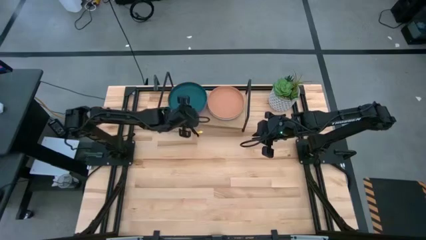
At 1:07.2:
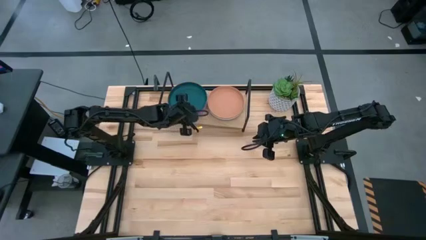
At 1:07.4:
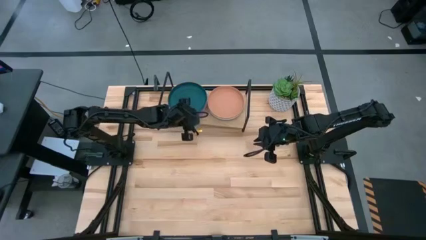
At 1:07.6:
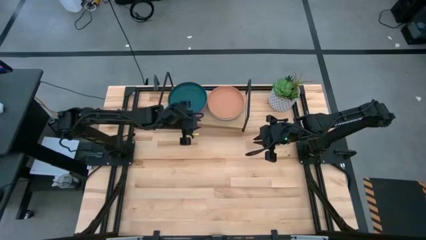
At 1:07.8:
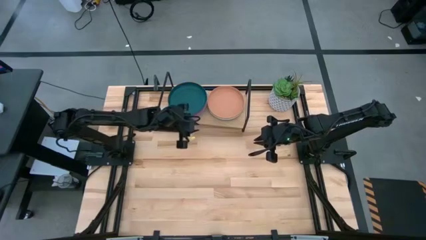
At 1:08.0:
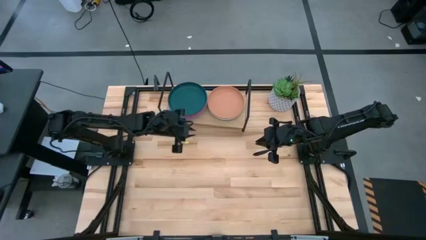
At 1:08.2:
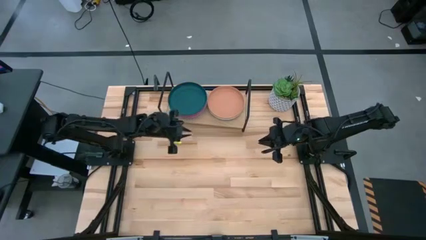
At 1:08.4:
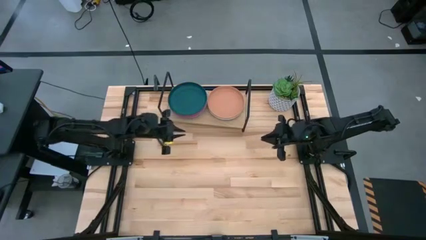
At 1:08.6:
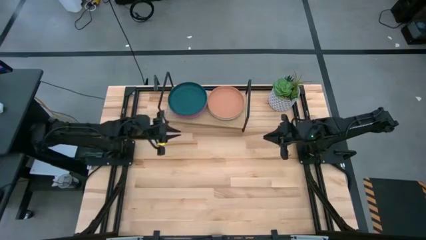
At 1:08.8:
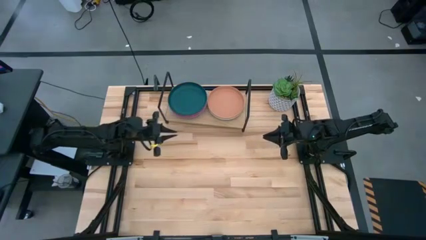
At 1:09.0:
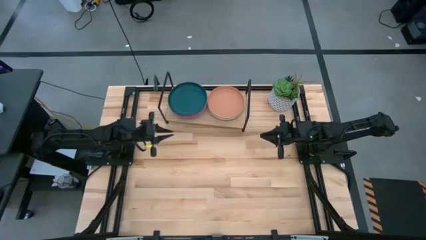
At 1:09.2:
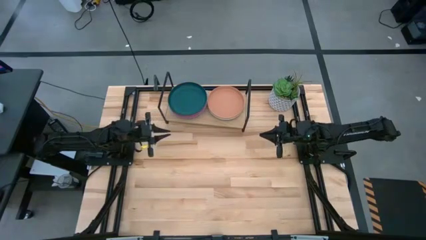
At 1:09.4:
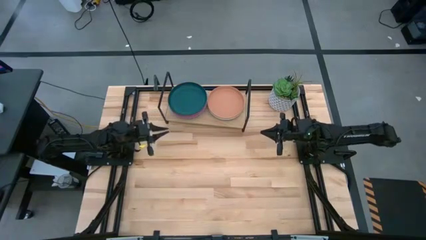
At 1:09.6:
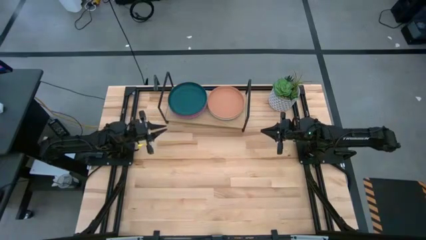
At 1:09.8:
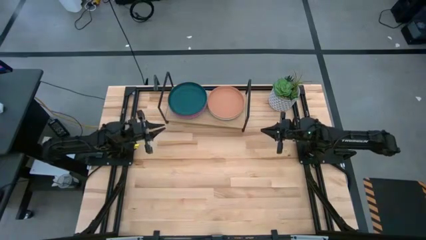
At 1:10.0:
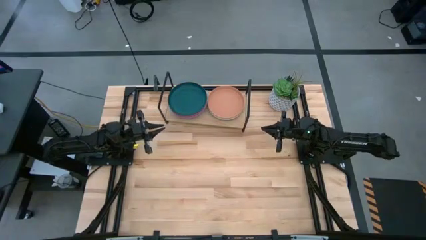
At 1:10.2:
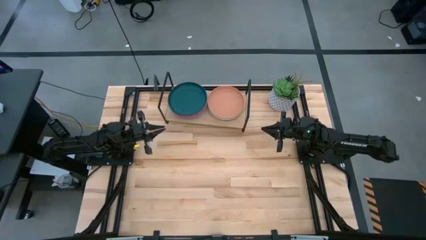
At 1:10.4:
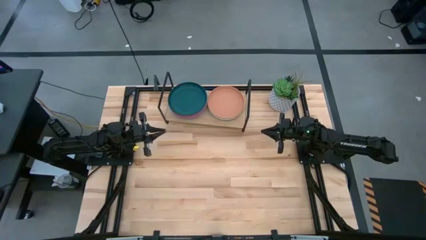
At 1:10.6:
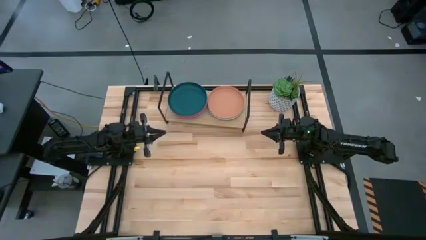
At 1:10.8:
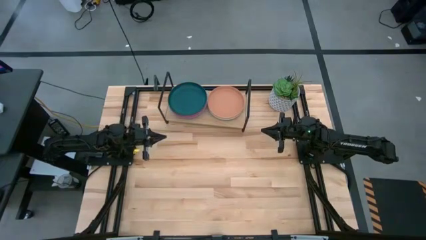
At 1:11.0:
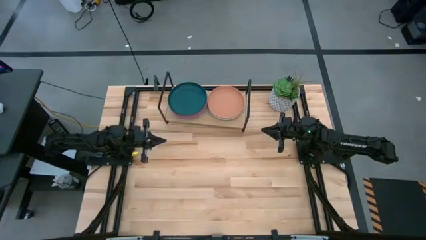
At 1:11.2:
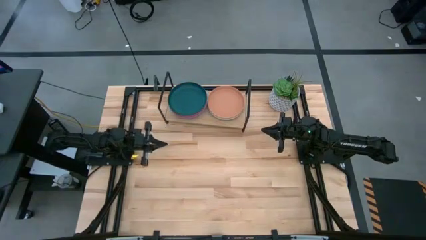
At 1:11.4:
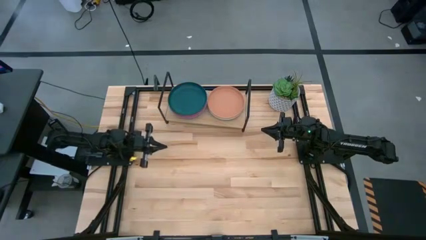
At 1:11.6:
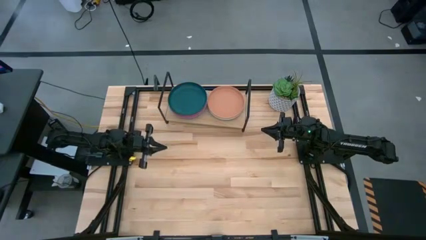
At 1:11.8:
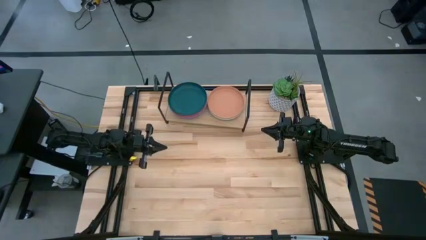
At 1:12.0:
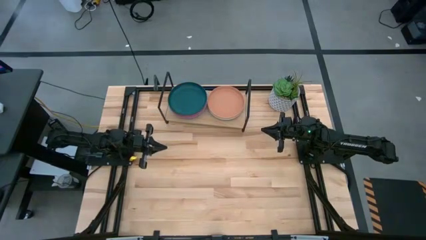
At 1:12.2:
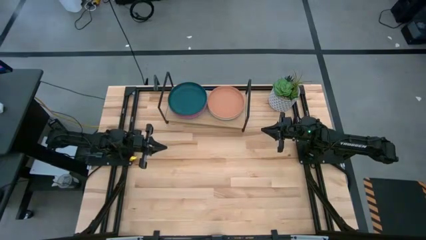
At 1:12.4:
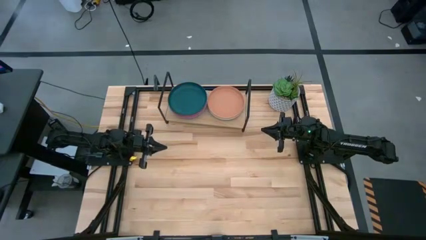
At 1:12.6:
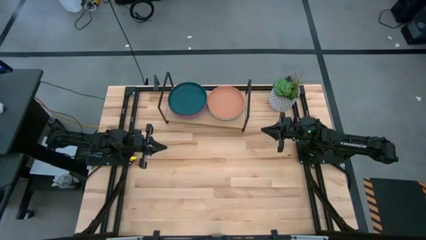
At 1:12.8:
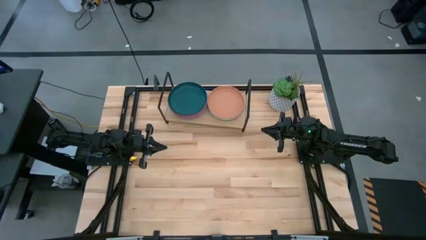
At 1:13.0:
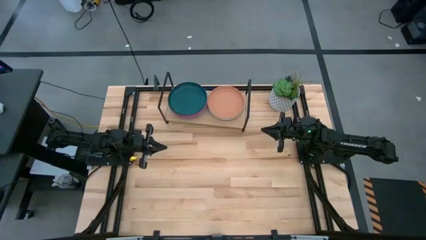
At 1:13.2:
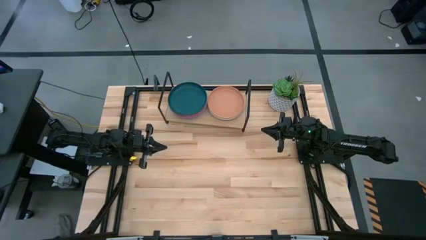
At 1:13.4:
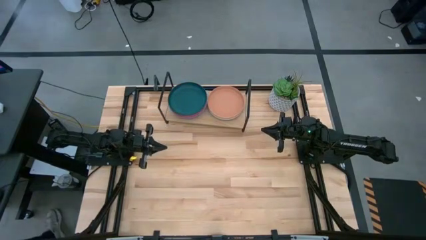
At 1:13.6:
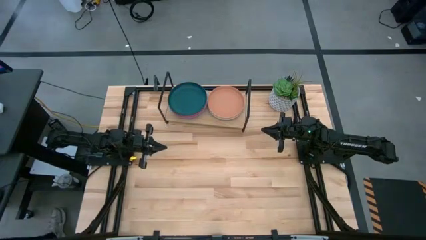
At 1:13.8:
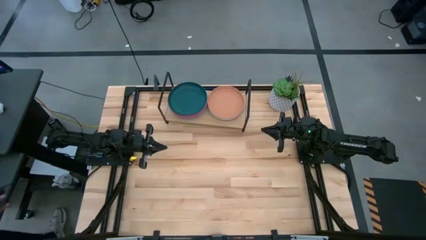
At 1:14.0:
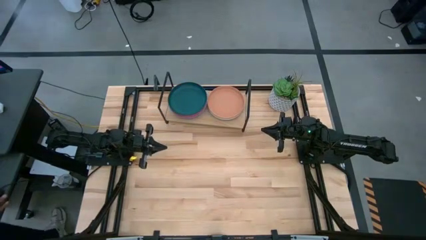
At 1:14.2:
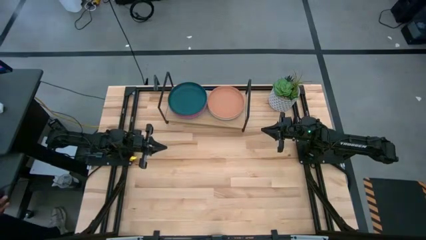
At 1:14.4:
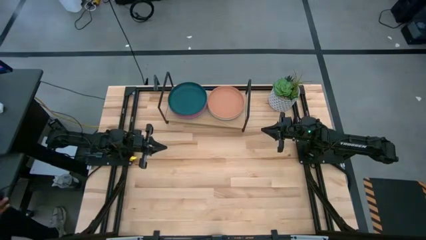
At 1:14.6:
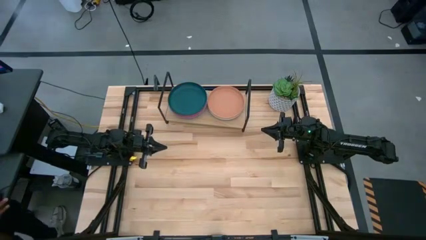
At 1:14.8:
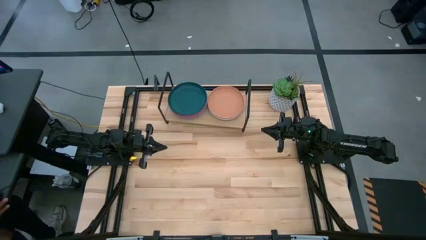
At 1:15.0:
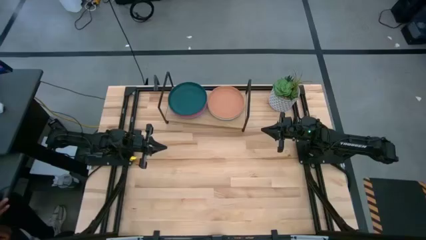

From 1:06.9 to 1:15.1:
Task: Place and stack plates onto a shelf
Return to Home Position

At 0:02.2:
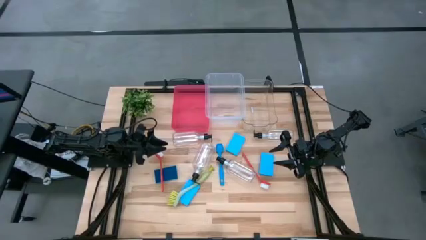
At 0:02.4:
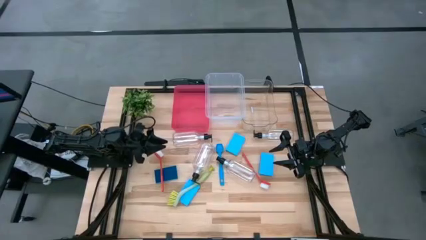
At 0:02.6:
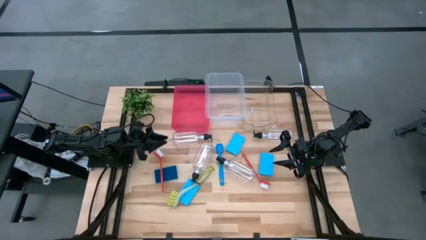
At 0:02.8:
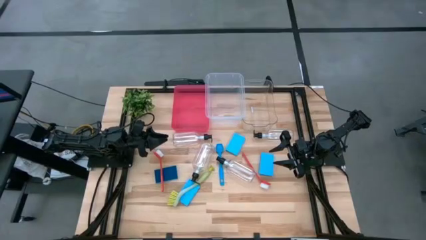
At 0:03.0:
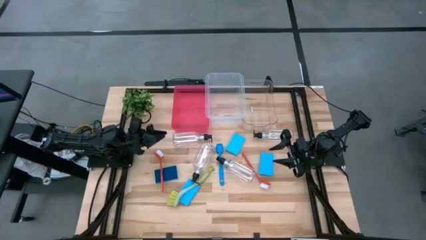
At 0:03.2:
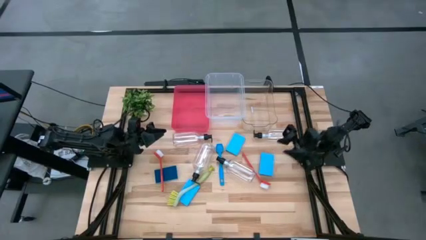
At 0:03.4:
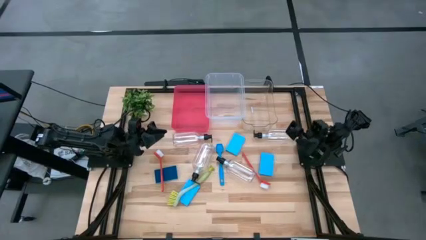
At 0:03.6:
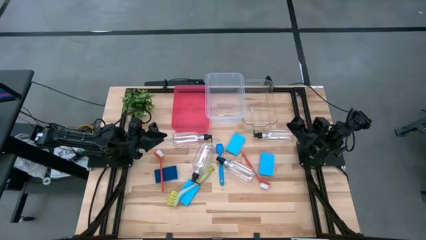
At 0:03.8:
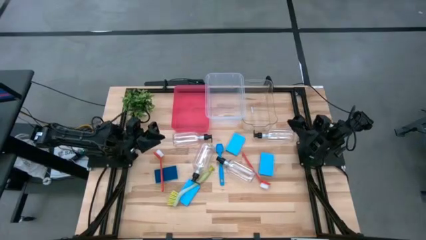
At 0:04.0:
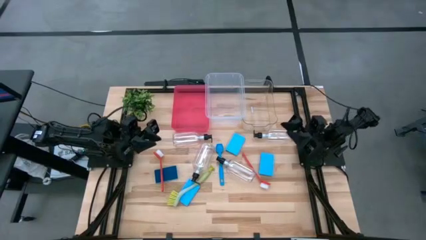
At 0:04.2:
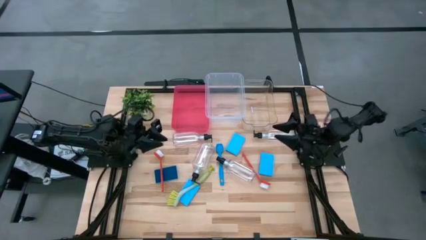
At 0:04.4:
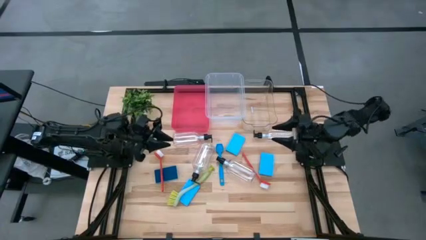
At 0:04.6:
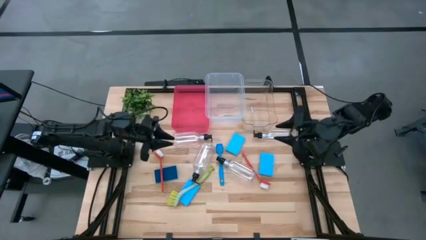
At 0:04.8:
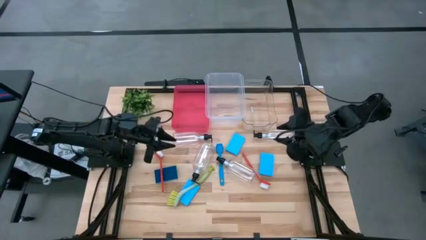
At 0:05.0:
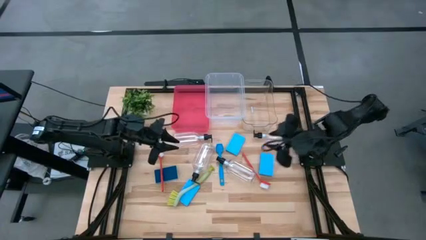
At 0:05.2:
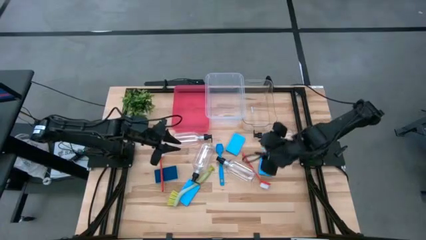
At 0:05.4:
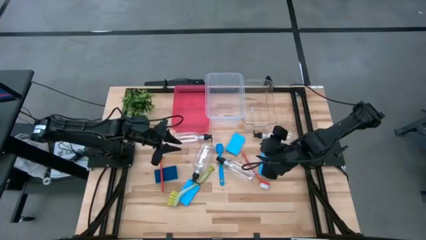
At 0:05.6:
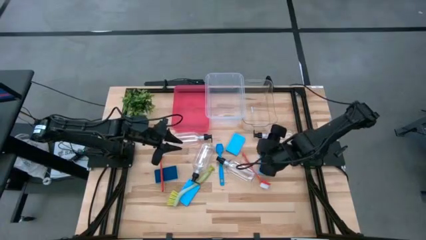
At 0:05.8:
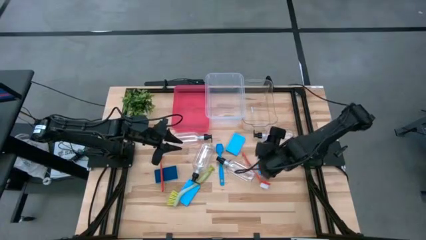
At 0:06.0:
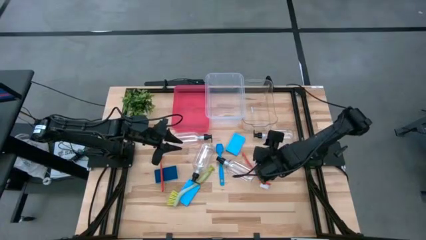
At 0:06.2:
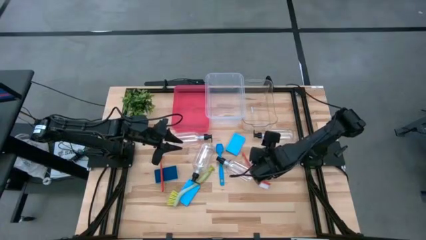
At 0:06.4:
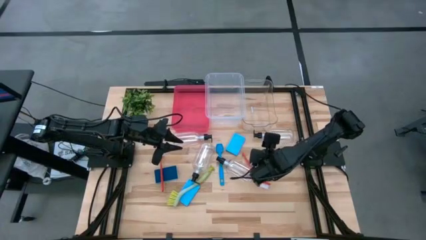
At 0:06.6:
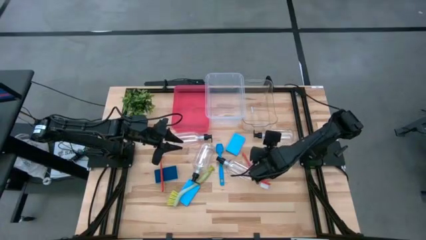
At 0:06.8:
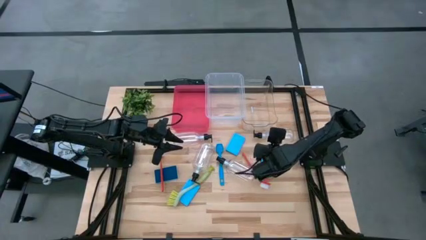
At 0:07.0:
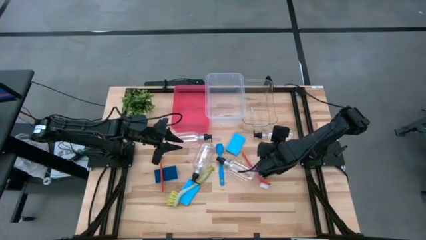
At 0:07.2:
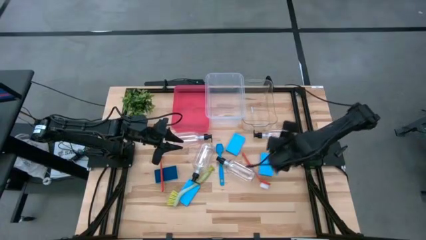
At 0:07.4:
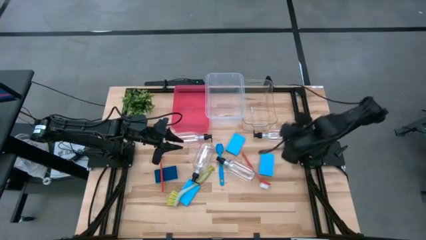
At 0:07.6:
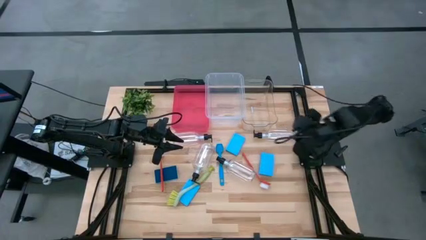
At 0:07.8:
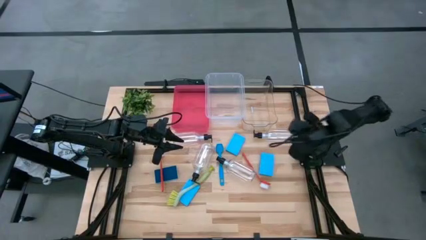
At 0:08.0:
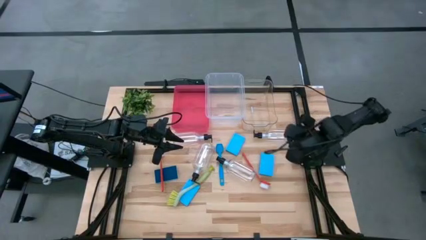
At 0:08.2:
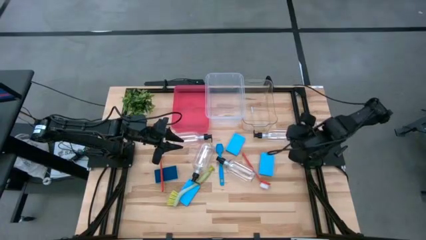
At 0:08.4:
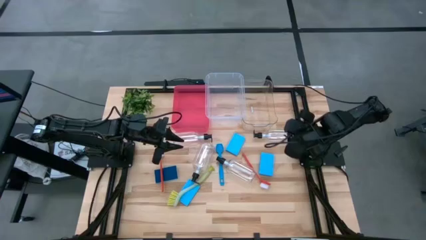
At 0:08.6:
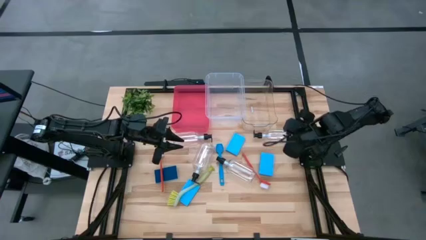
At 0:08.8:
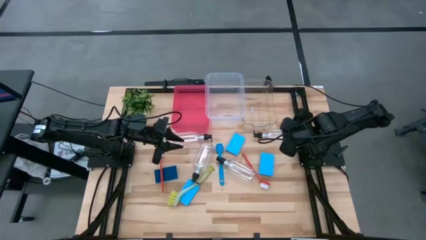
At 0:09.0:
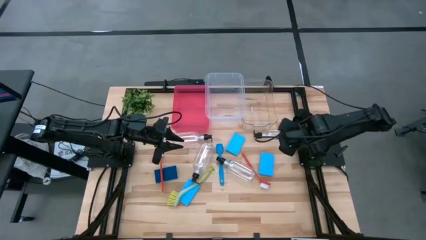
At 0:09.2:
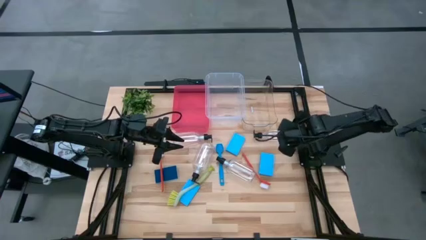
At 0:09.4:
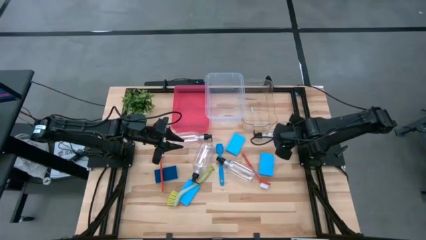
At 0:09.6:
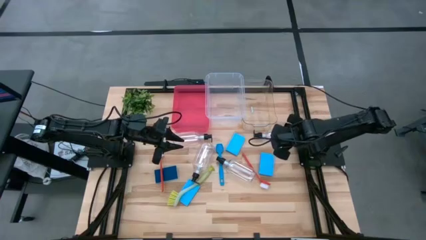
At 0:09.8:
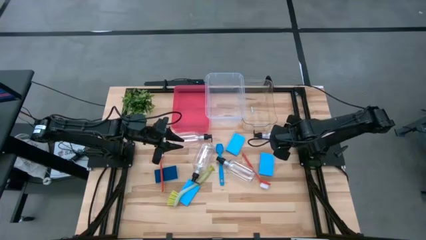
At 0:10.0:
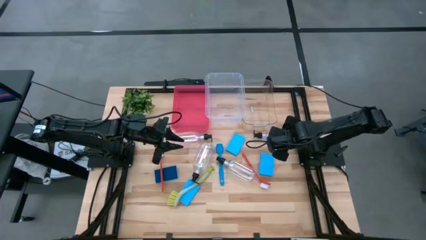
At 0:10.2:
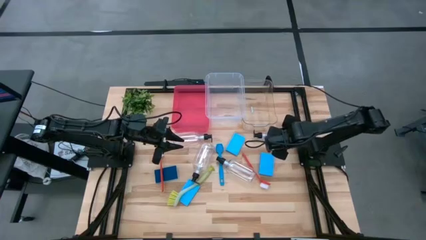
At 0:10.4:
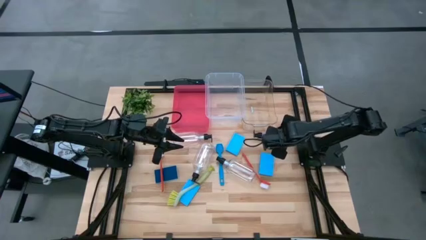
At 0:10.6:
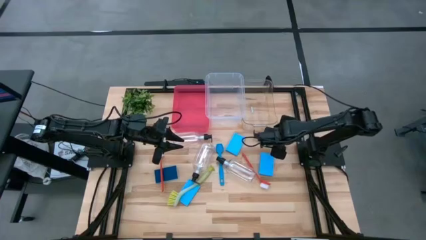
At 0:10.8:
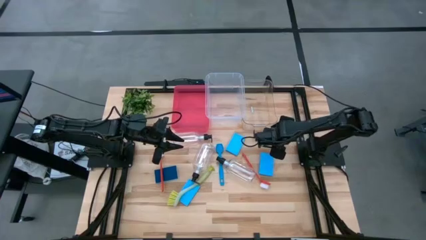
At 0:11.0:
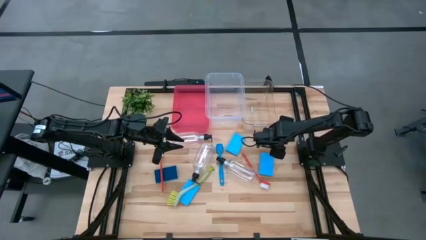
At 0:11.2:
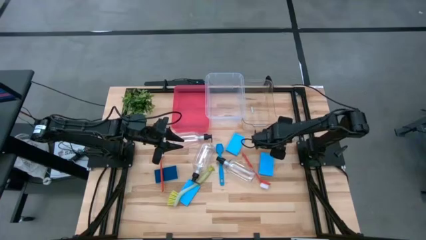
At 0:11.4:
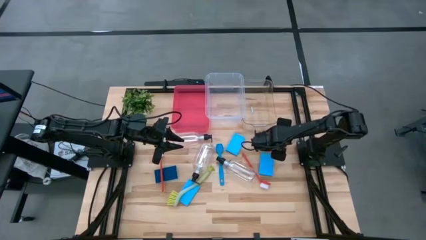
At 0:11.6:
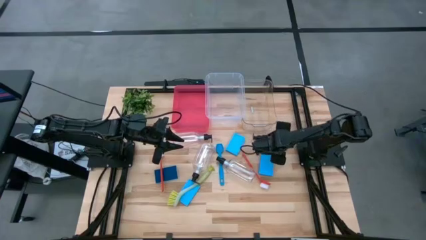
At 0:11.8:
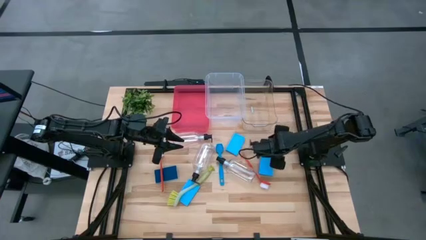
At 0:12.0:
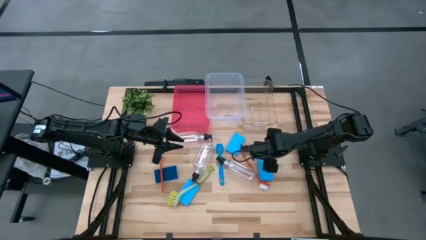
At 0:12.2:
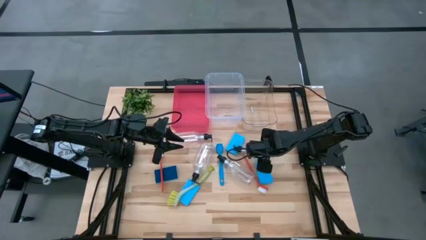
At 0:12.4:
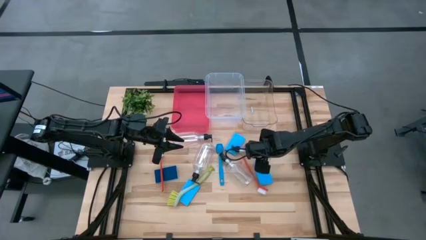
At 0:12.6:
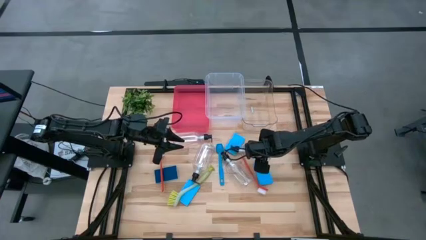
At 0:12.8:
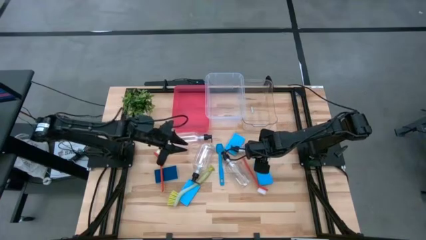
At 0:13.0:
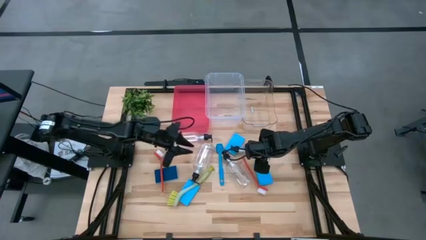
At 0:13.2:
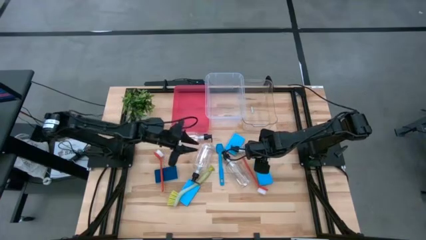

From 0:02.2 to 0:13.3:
Task: Pick & Place Kitchen Sink Supplies
Put the top right transparent dishwashing liquid dispenser into the red bin
